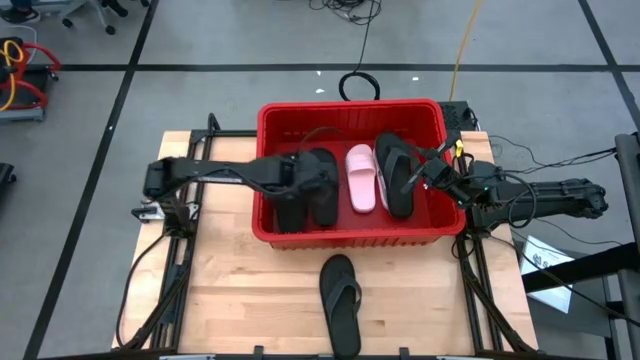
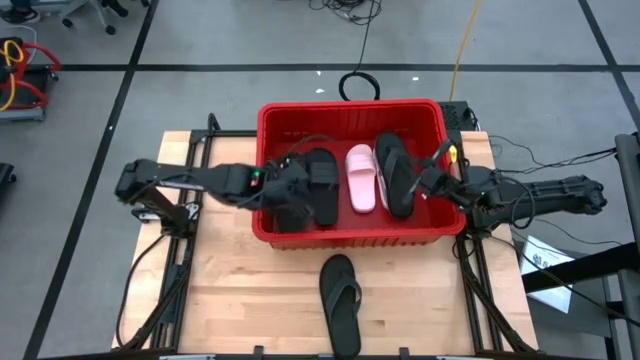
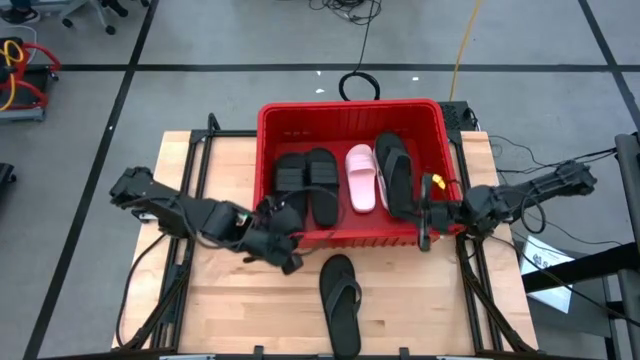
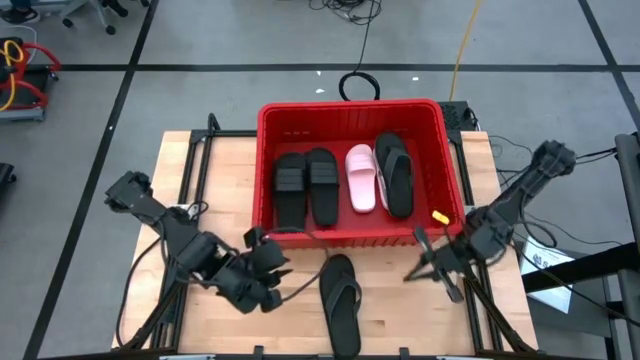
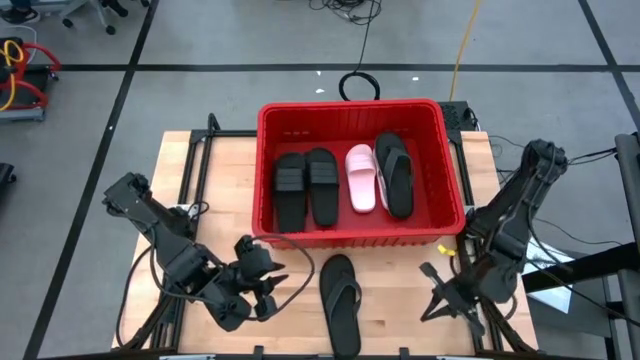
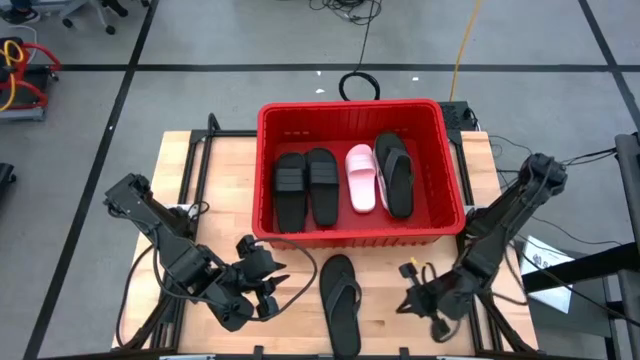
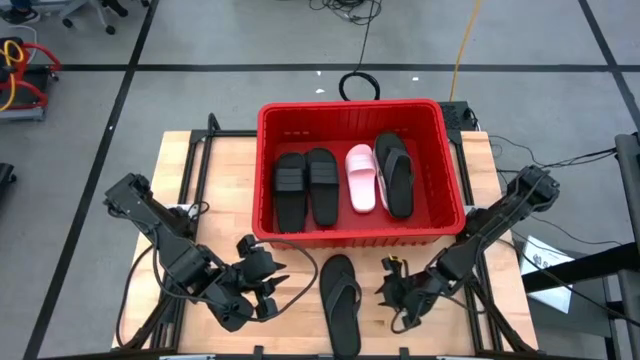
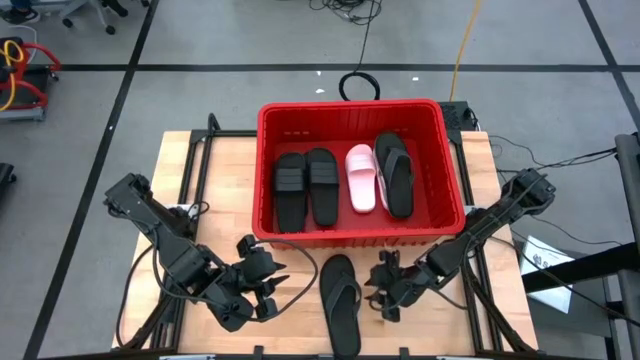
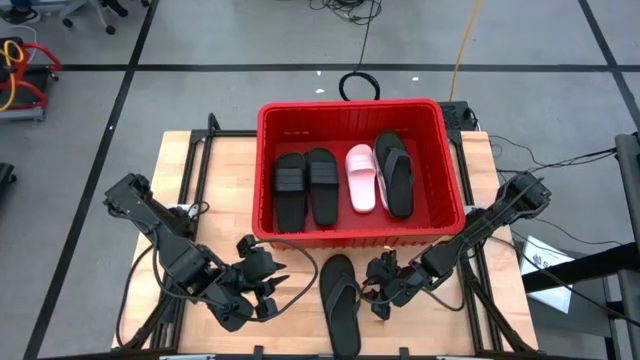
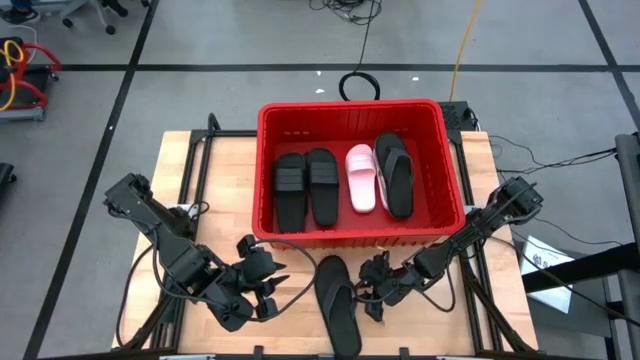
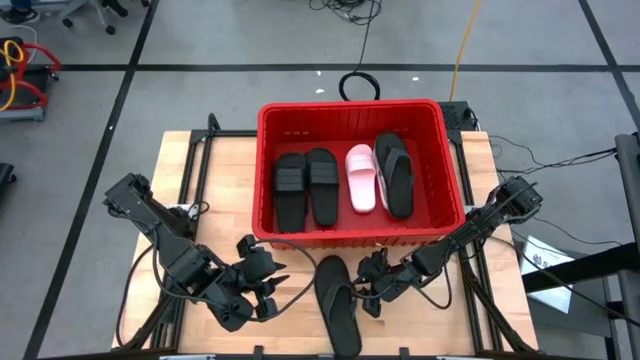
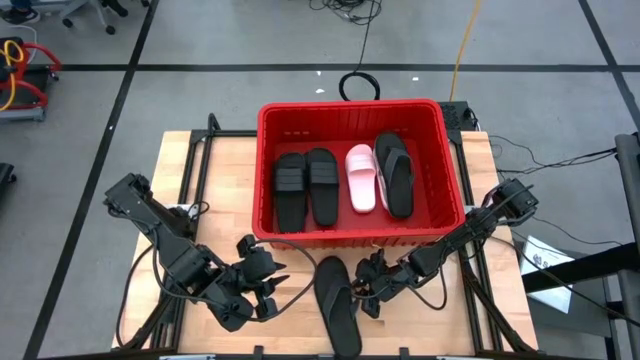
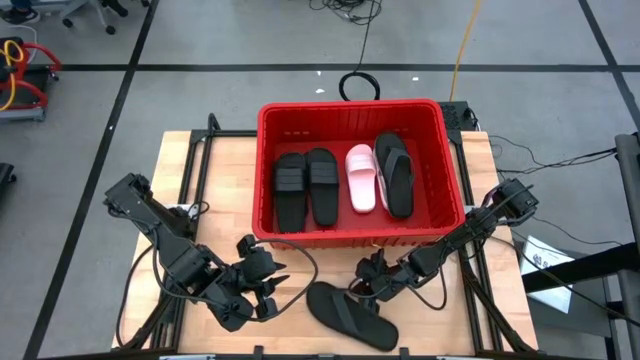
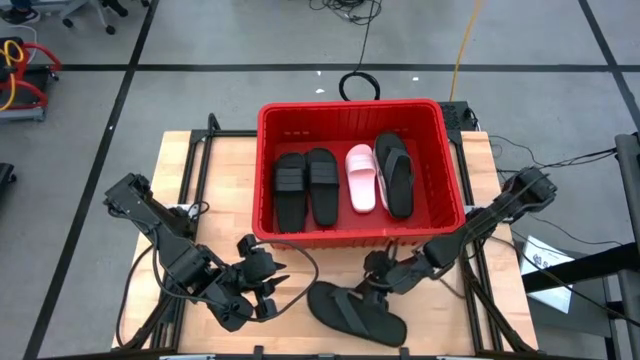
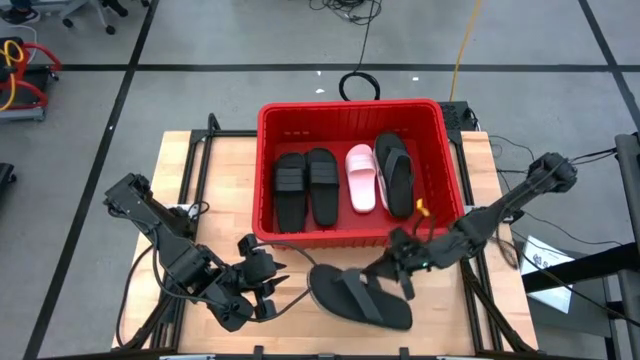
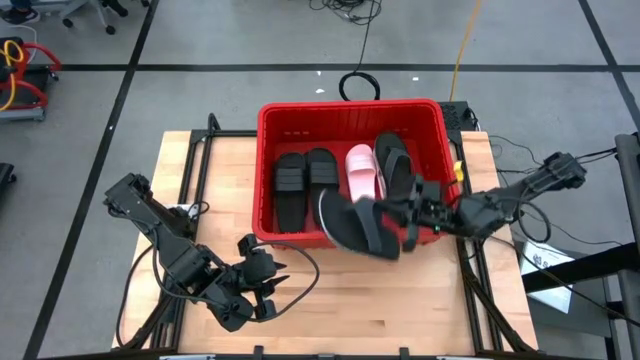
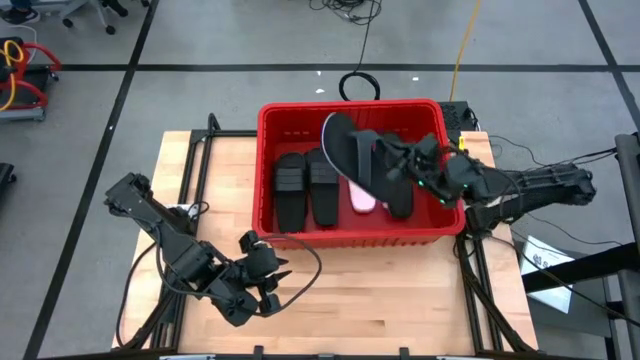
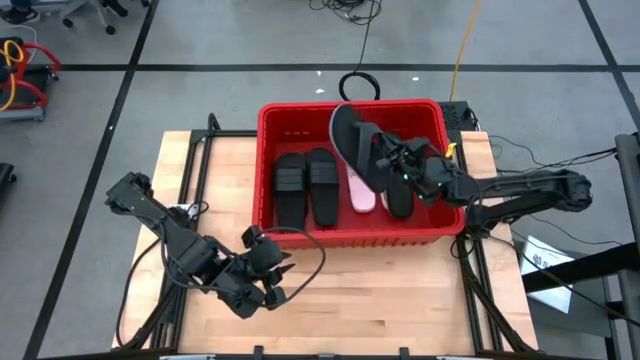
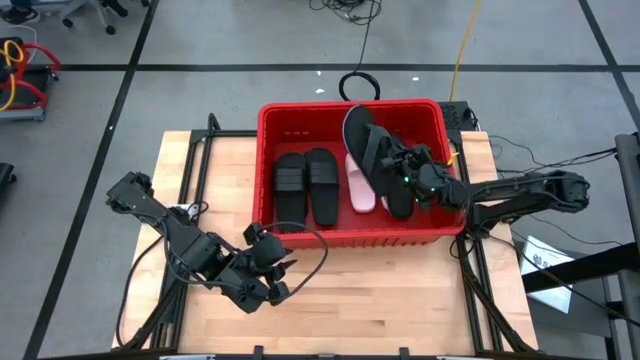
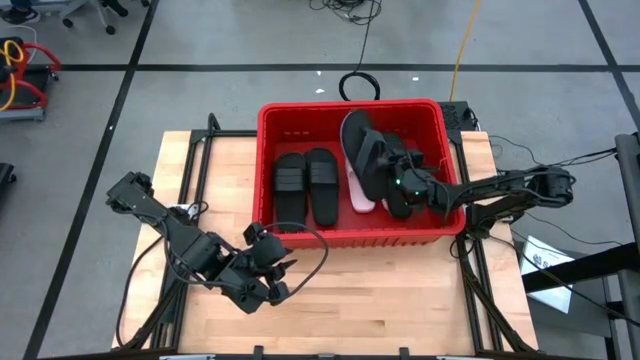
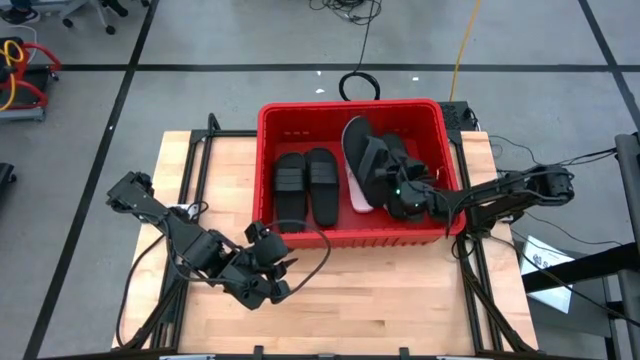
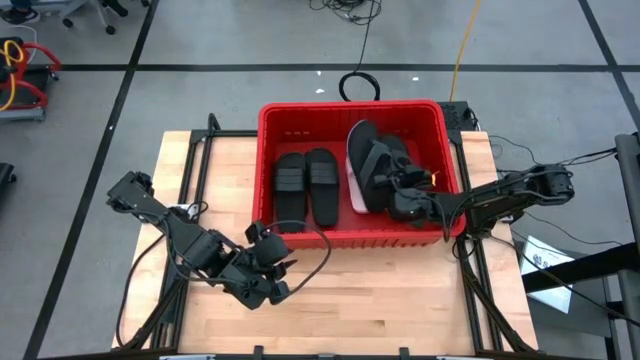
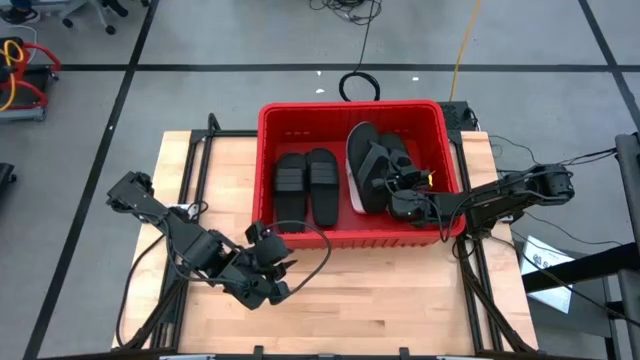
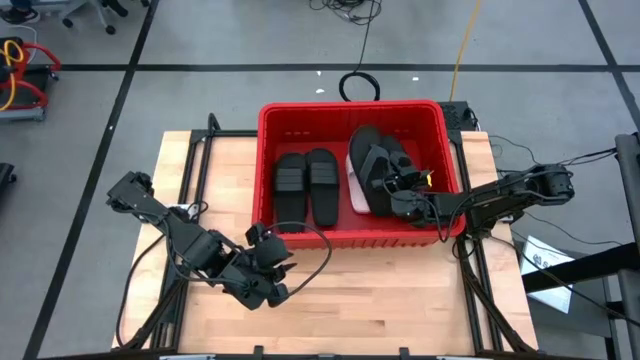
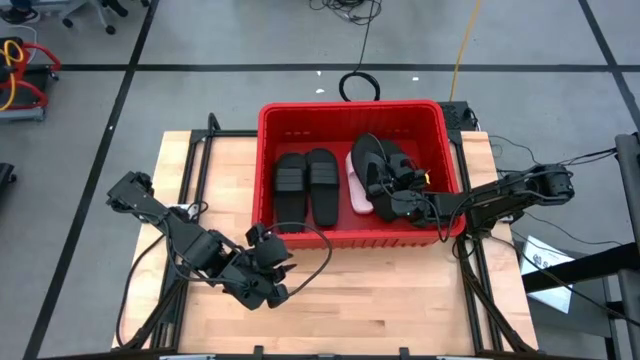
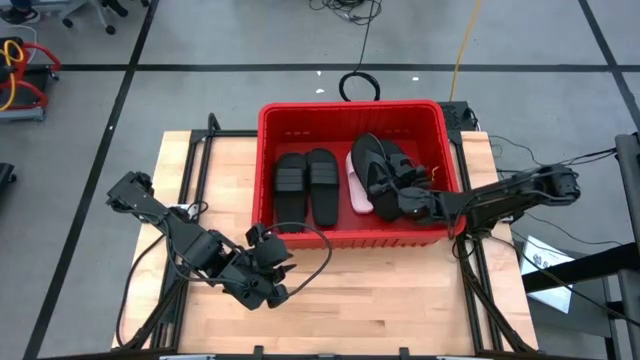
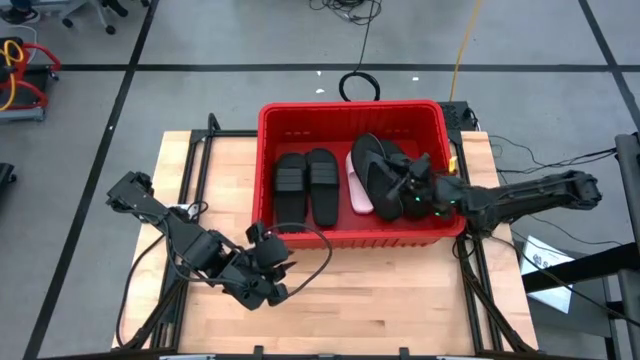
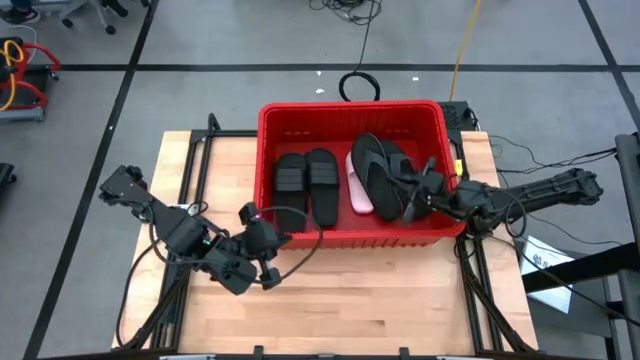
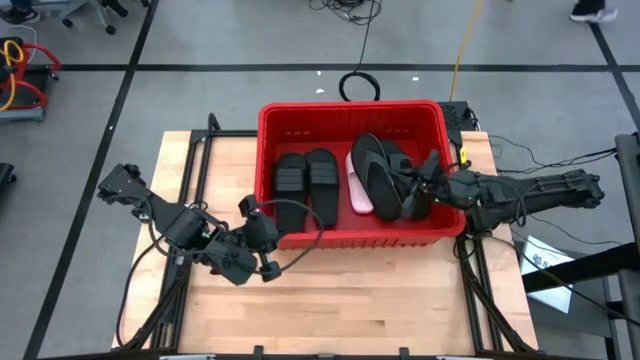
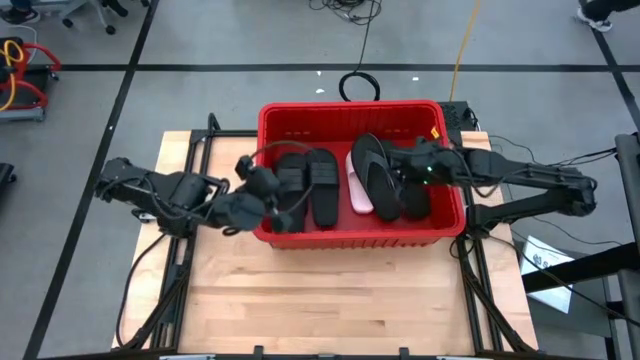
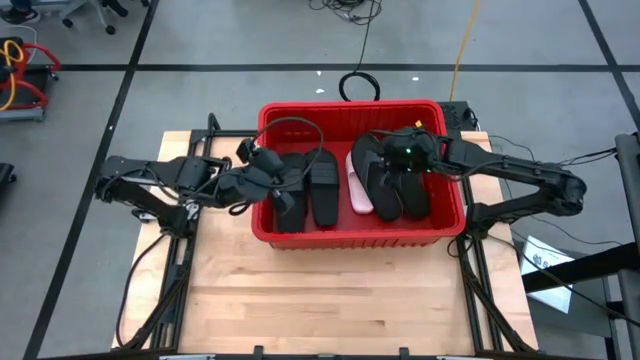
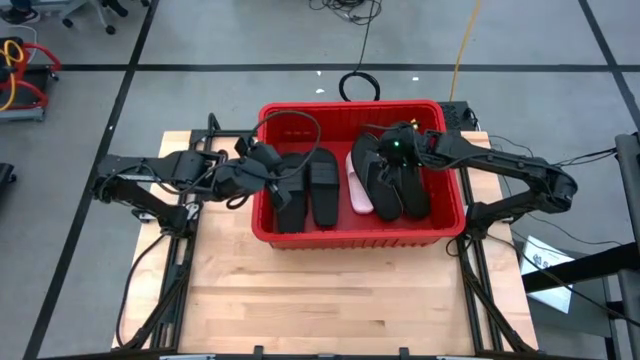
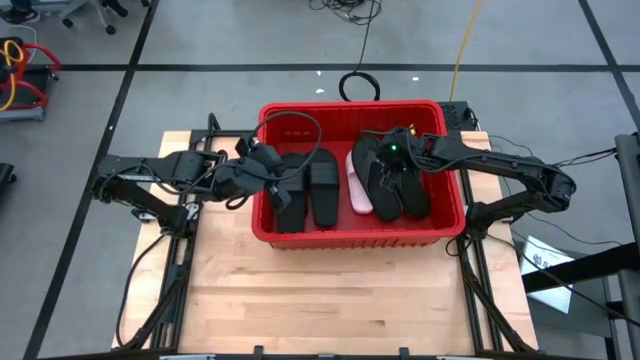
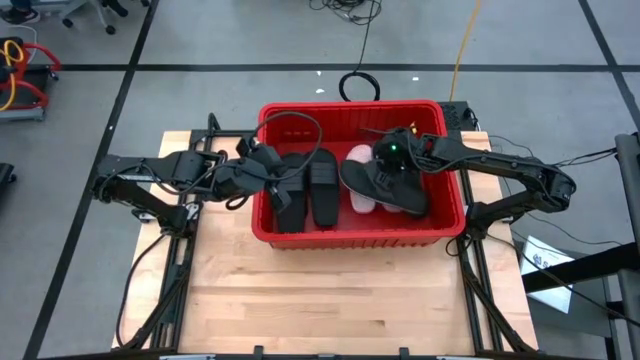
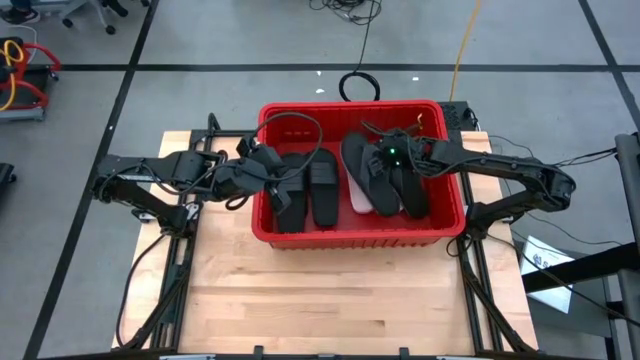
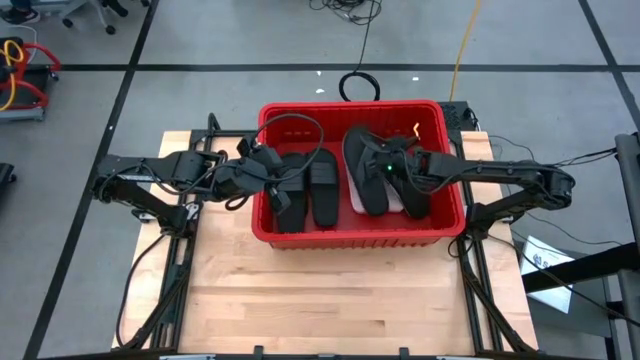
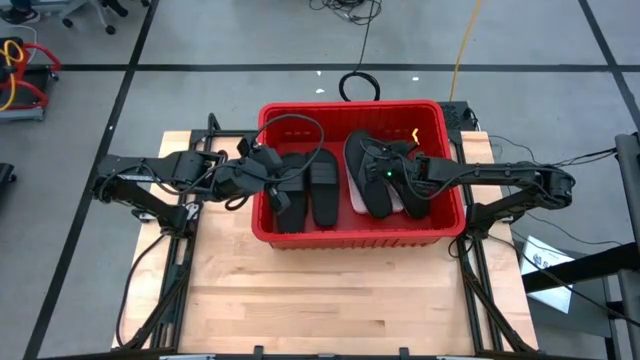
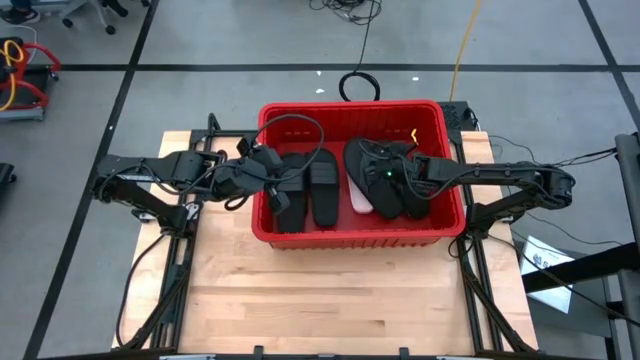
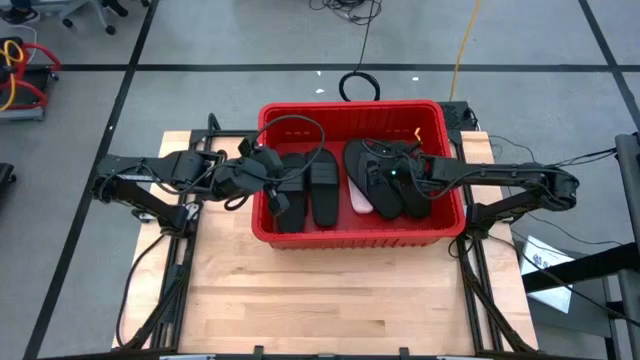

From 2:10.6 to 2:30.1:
Task: Pick and place slides into bin
Put the black slipper into the red bin

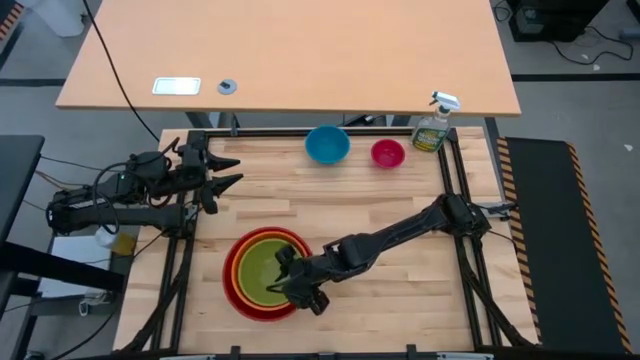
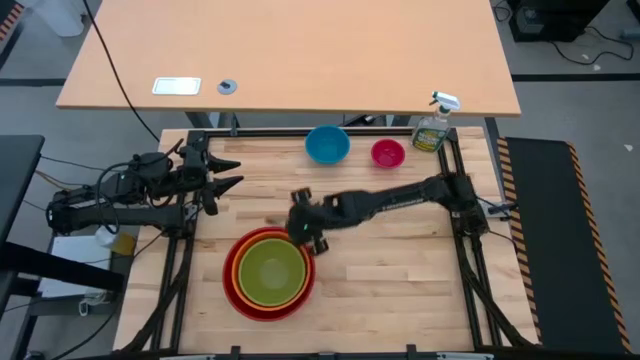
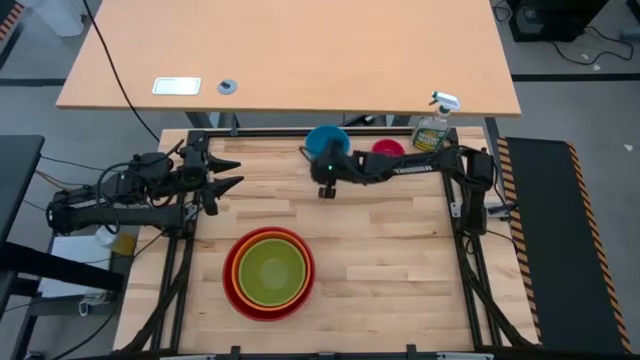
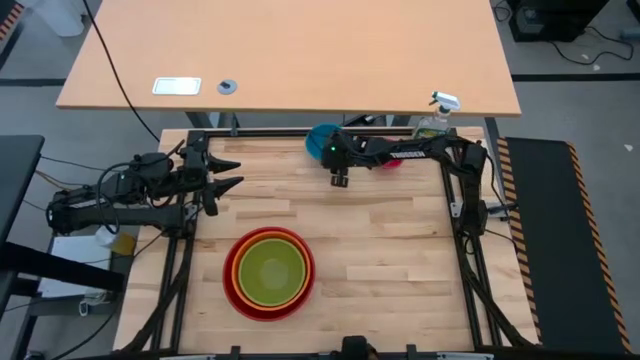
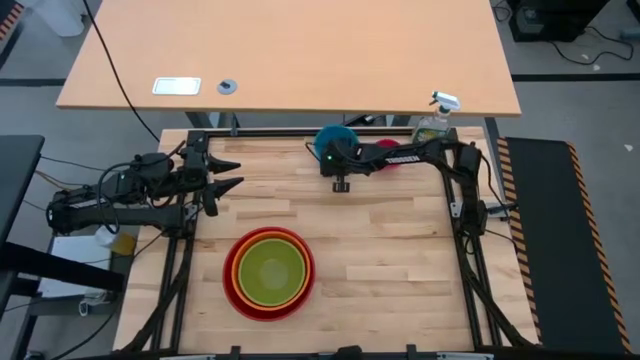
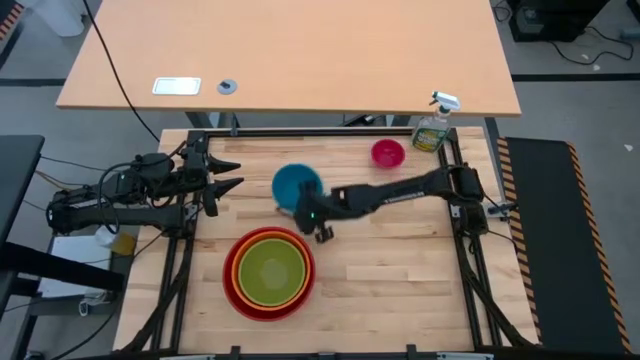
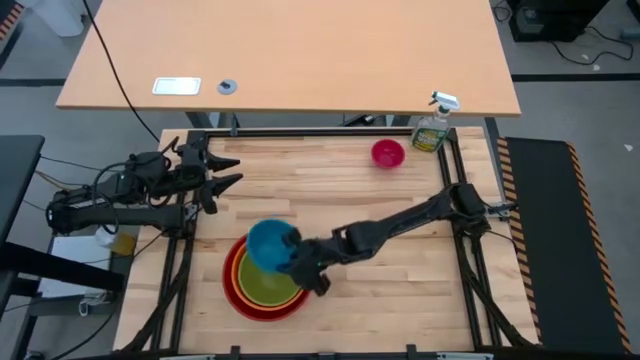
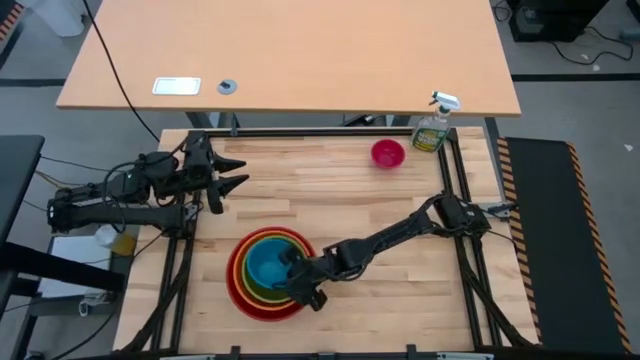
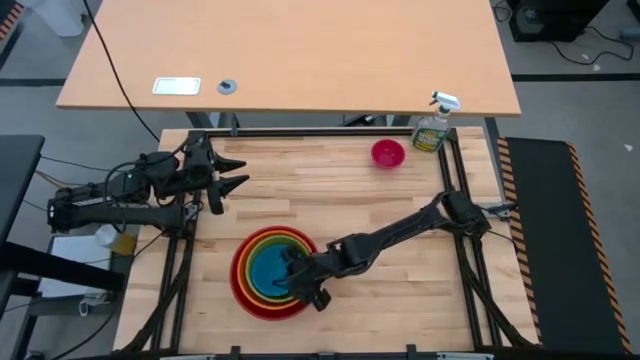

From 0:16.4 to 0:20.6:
Task: Nest bowls inside each other by size order
Stack the blue bowl on top of the green bowl
